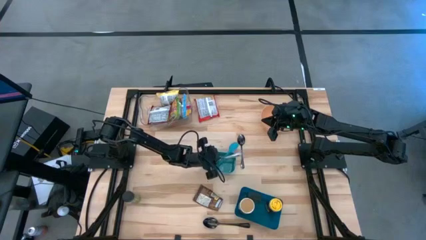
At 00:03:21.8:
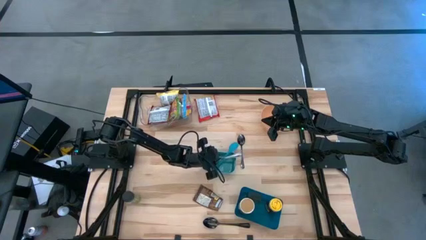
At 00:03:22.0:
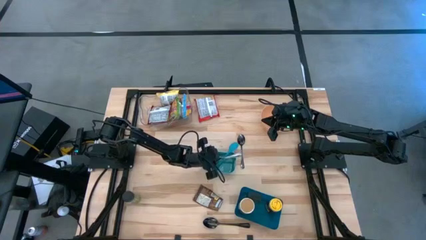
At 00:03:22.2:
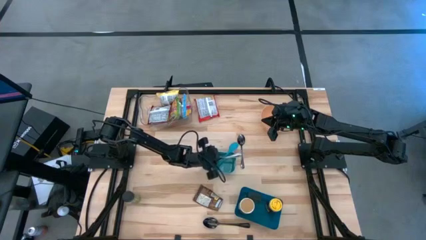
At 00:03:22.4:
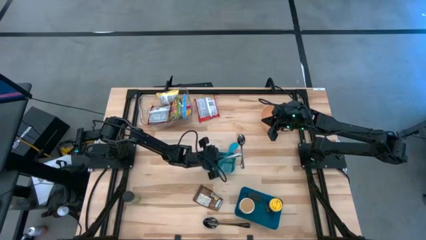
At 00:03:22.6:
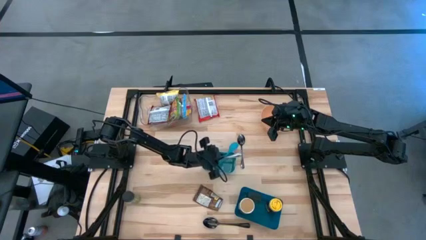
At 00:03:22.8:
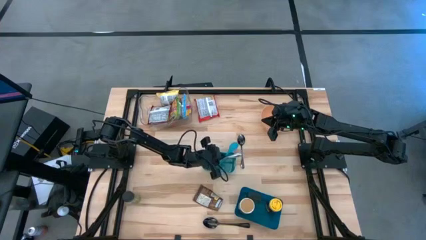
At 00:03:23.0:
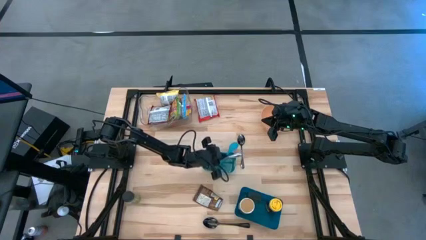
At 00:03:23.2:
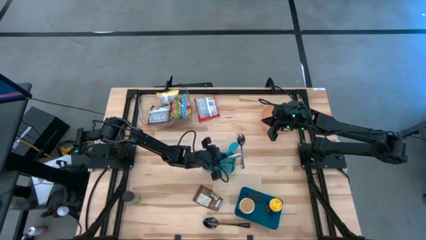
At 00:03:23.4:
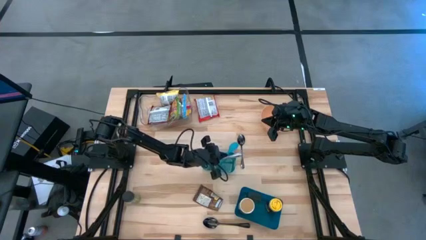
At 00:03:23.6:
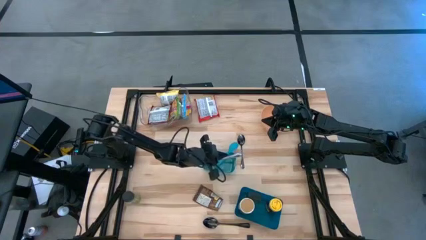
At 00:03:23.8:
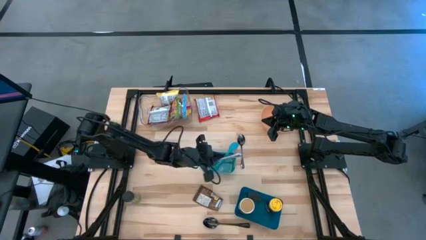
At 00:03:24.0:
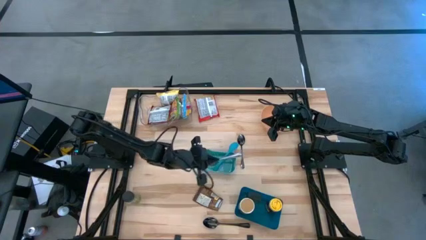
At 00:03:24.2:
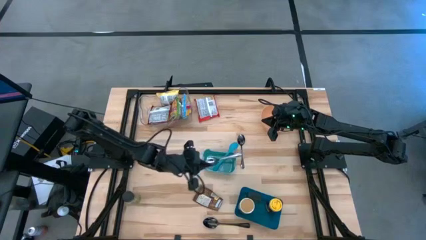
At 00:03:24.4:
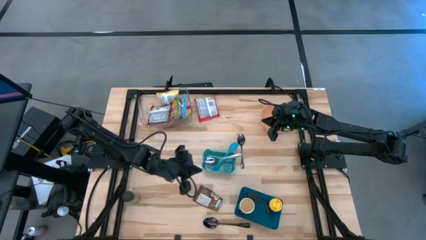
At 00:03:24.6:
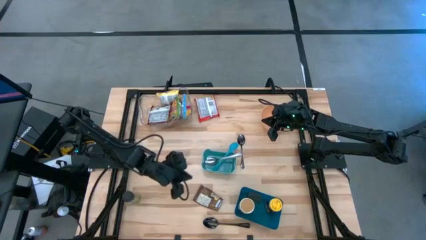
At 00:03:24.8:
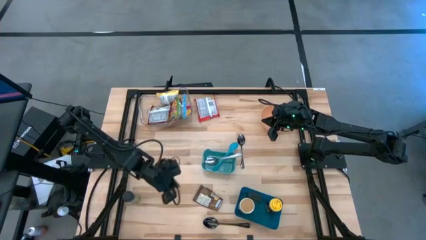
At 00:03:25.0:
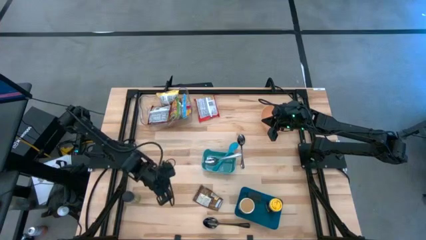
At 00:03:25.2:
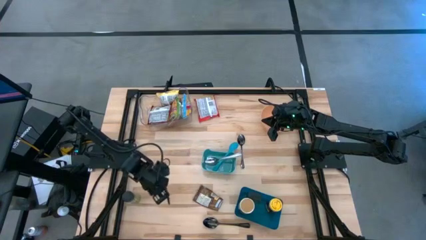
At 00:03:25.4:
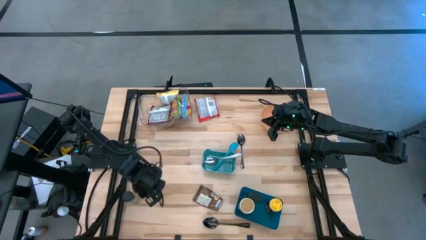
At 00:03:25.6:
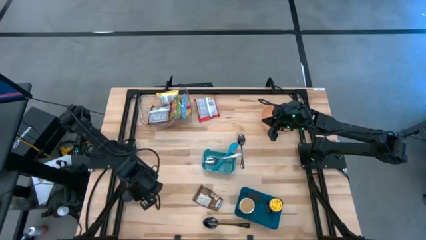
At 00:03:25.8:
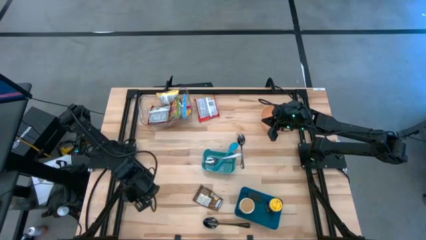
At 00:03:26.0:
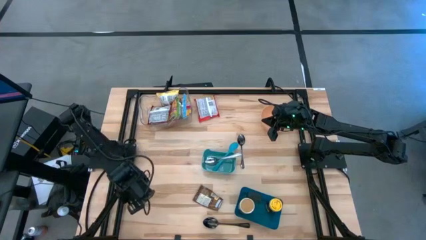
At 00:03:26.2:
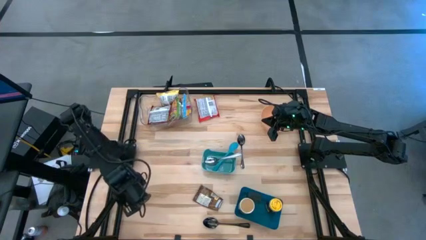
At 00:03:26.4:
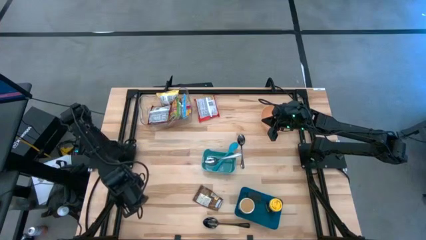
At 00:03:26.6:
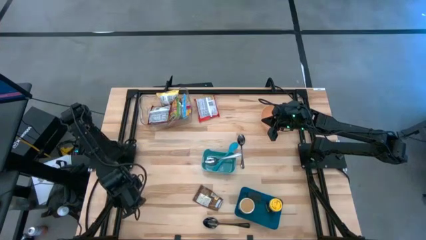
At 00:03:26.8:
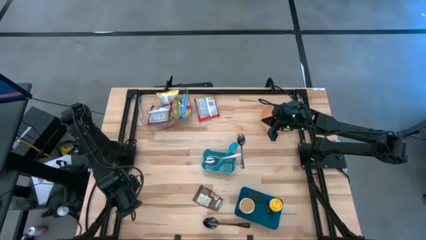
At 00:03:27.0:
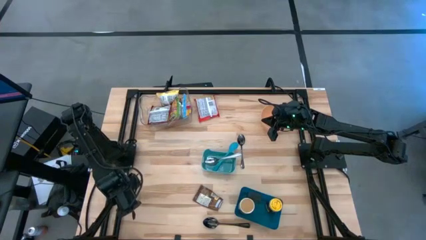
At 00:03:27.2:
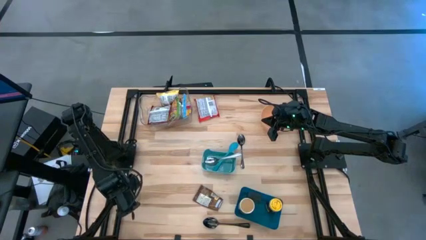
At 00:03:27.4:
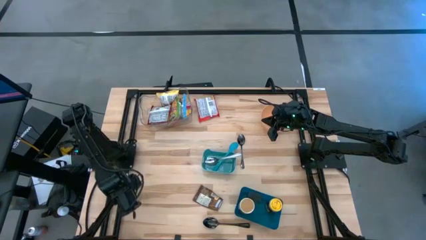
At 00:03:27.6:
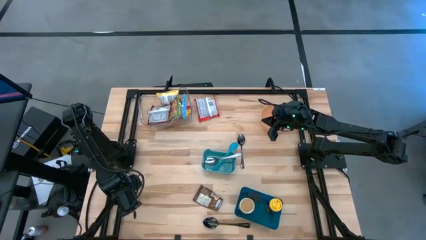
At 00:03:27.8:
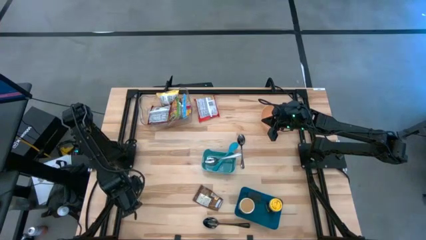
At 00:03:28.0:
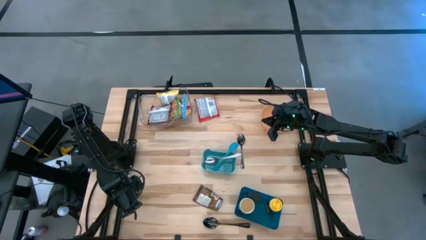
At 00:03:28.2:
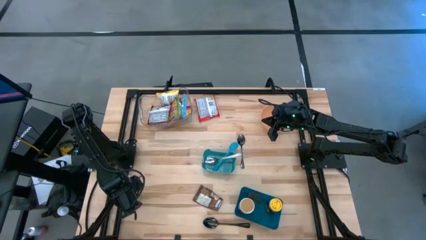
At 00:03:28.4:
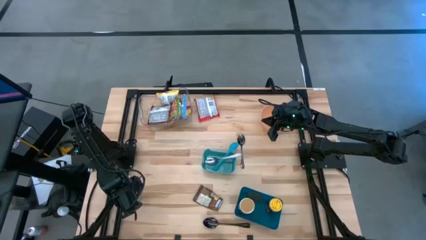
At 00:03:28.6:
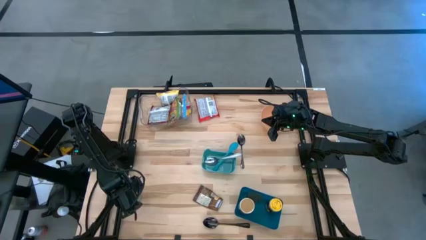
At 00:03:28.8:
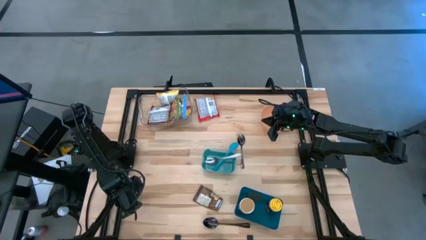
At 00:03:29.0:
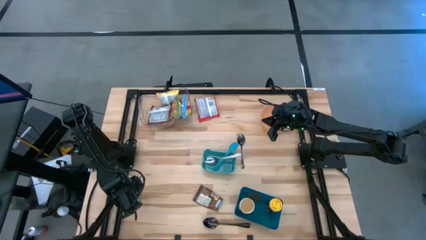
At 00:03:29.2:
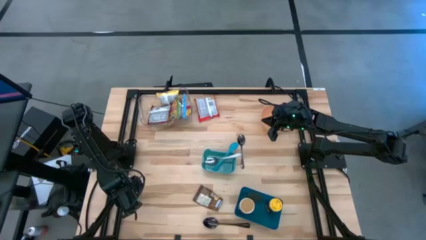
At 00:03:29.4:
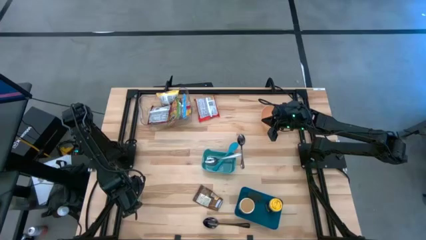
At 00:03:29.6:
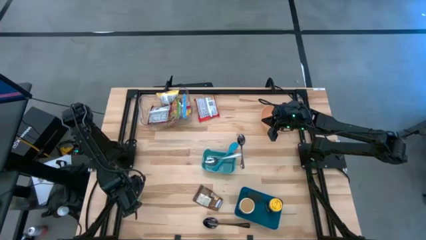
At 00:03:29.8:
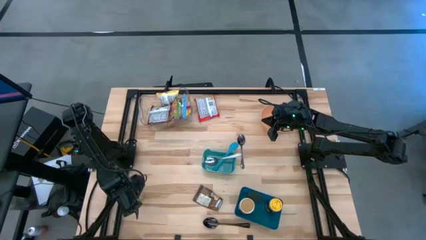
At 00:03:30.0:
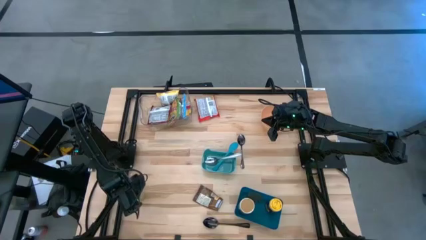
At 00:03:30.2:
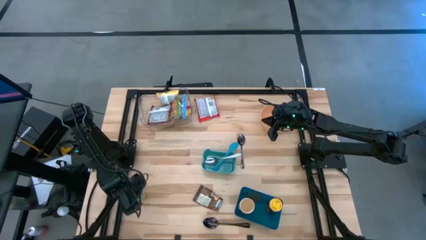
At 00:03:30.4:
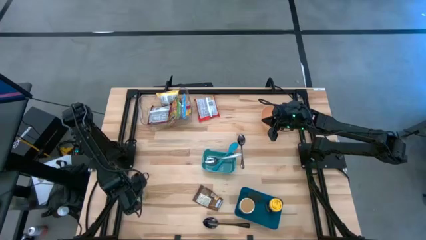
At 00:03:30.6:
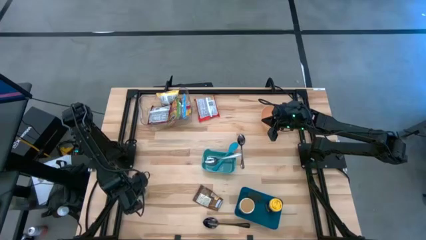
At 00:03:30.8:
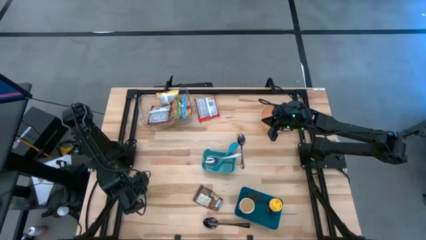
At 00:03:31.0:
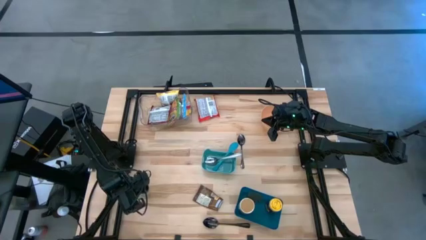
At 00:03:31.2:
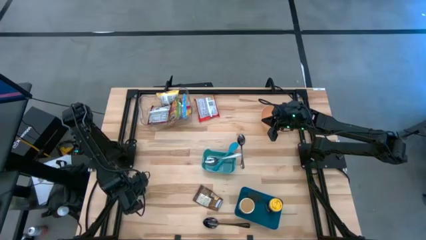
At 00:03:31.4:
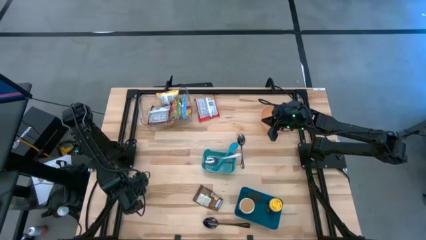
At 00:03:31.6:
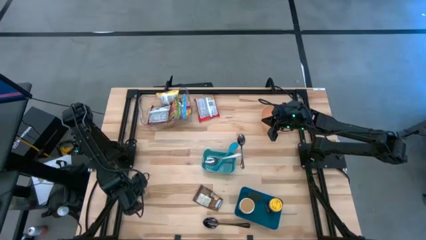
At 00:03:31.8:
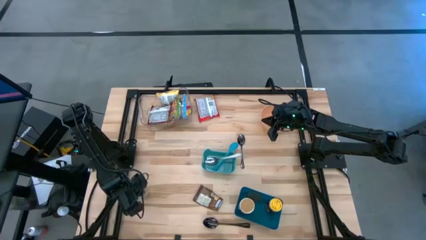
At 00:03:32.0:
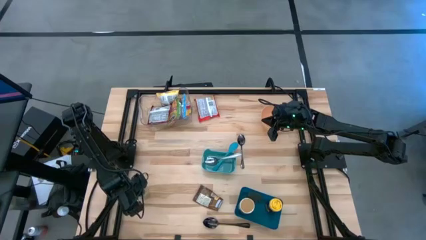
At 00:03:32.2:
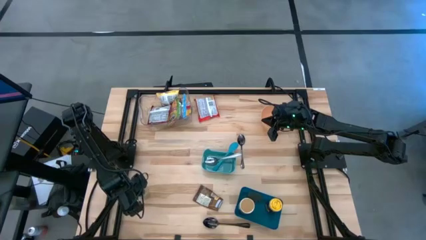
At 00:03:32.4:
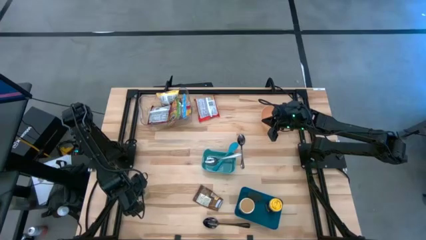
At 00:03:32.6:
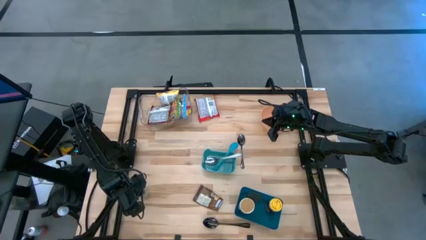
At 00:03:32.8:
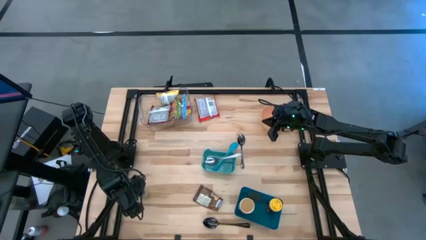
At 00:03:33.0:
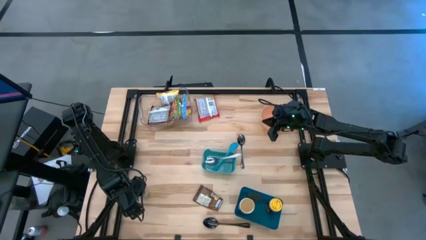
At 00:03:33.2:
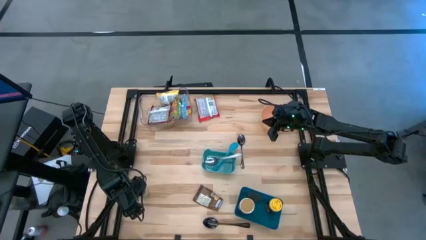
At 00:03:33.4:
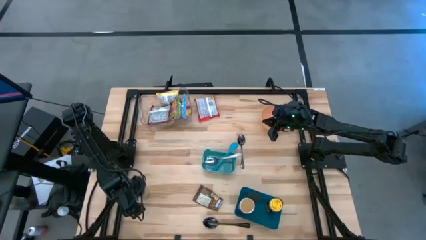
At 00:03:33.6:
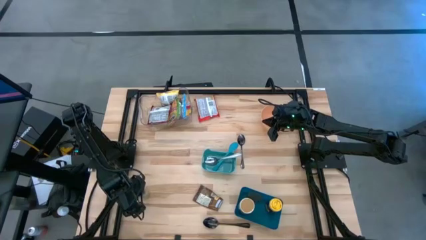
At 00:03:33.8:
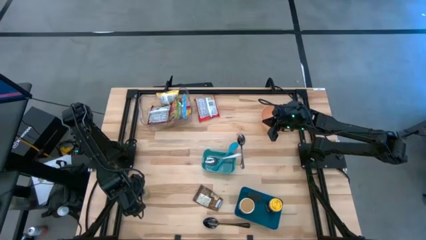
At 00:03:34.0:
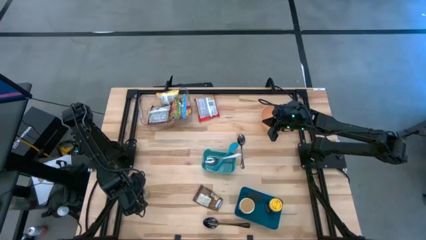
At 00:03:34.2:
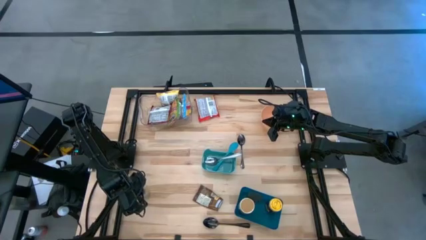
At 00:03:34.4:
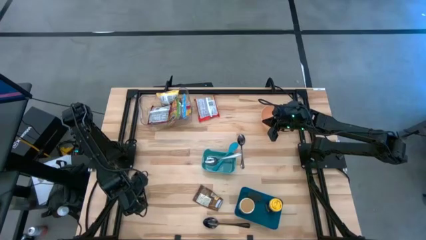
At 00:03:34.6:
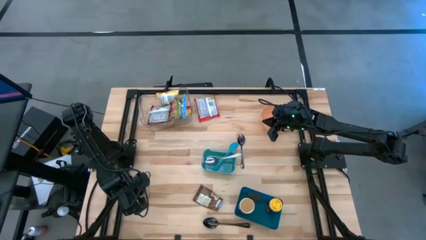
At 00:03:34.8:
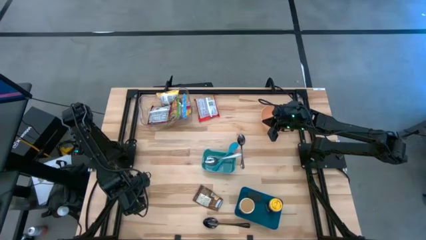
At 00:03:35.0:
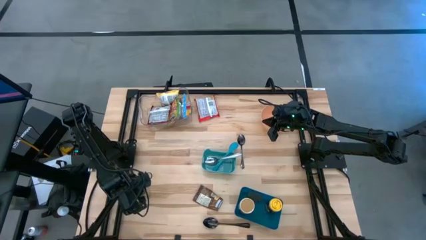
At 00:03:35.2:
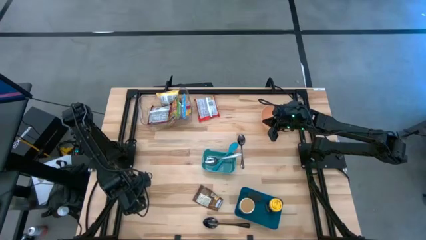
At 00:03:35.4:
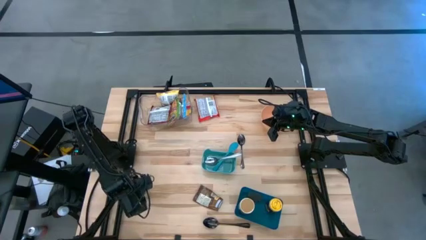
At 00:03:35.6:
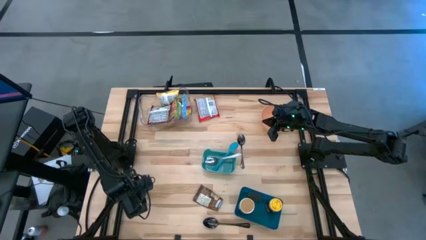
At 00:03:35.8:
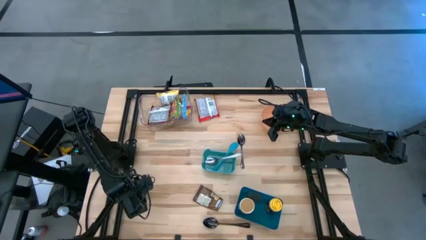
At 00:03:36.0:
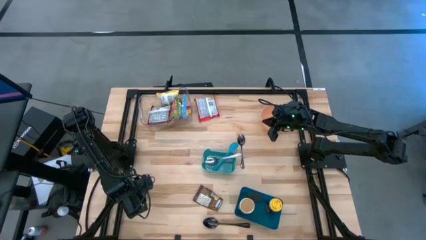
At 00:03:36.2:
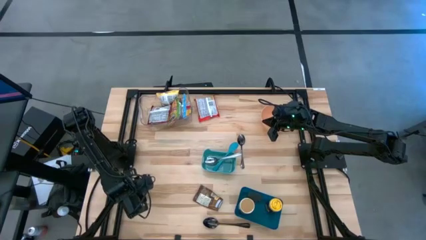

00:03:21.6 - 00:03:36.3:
Task: Pick & Place Food Item
Put the green seasoning bottle into the blue bin
